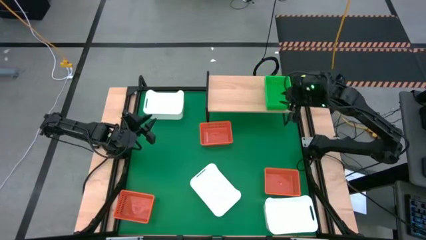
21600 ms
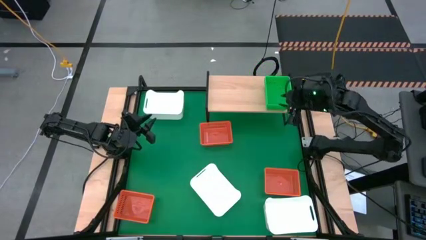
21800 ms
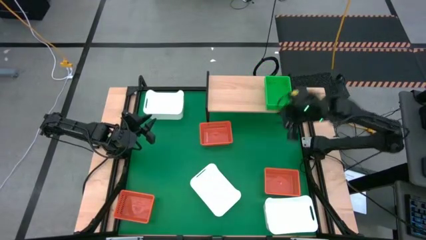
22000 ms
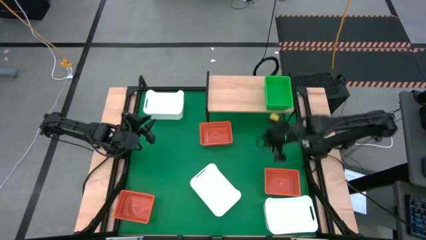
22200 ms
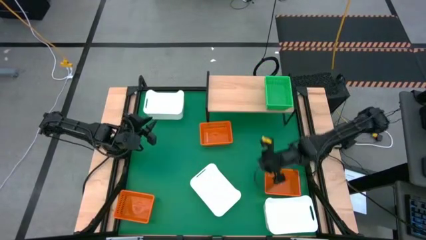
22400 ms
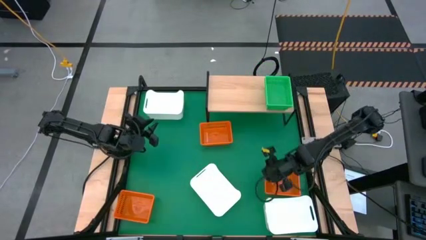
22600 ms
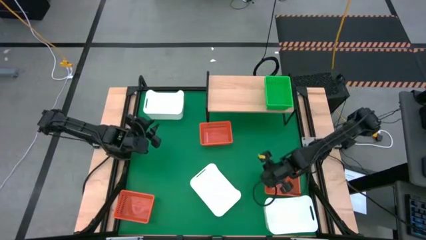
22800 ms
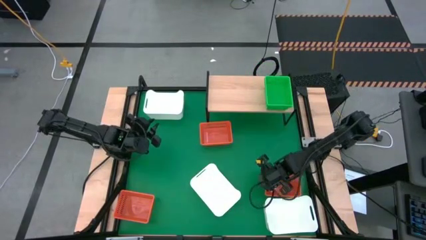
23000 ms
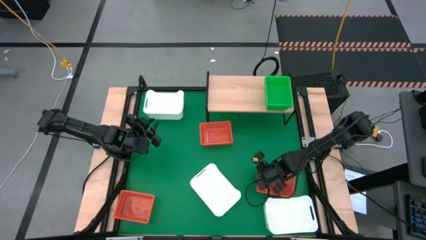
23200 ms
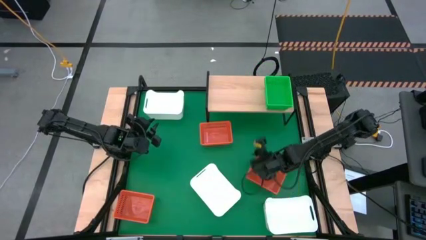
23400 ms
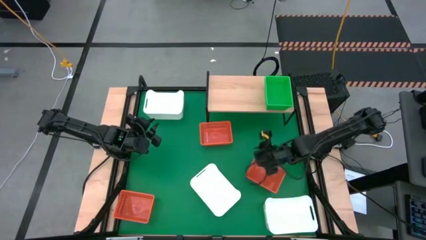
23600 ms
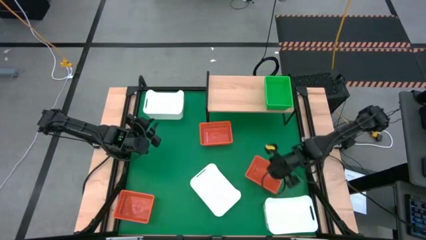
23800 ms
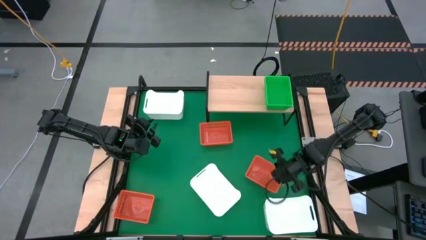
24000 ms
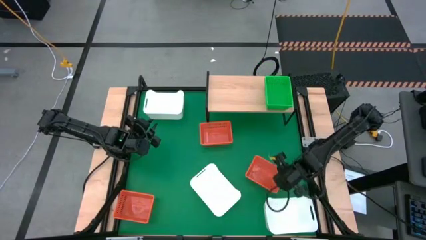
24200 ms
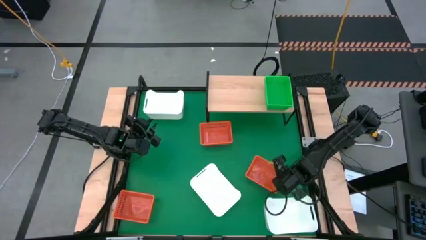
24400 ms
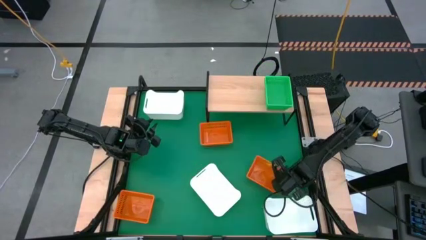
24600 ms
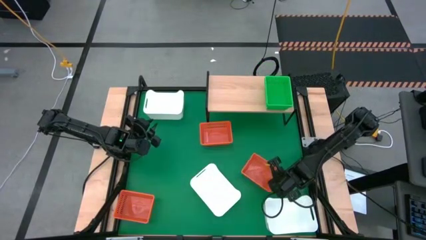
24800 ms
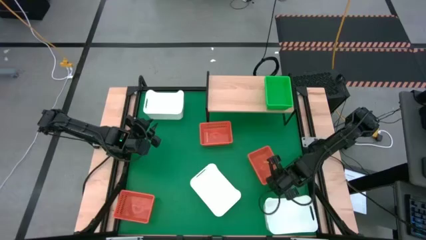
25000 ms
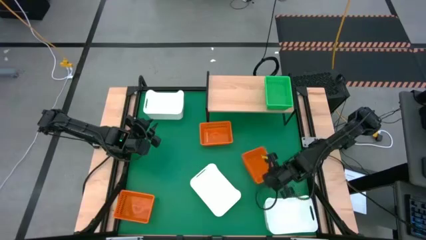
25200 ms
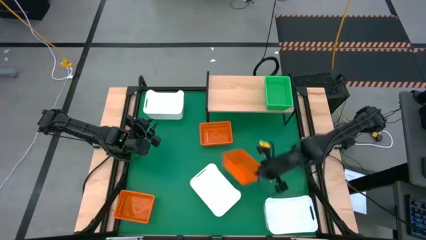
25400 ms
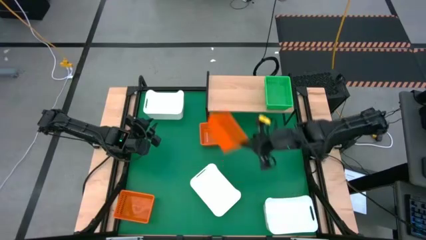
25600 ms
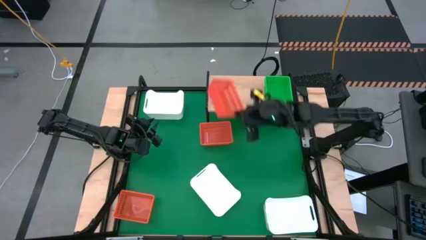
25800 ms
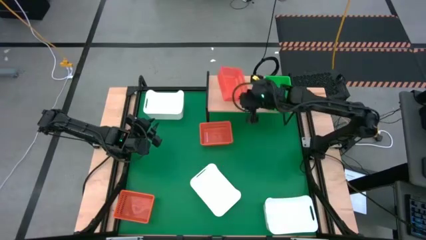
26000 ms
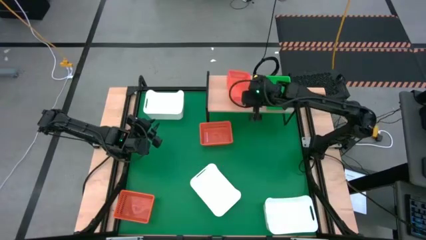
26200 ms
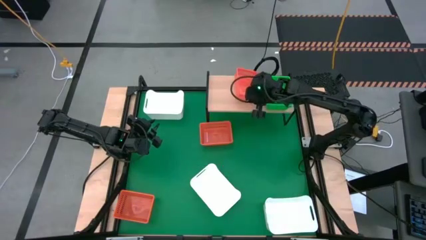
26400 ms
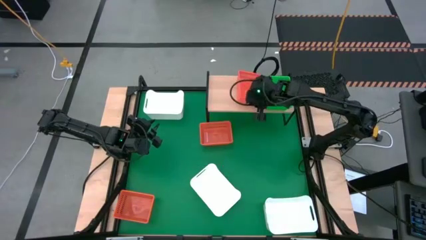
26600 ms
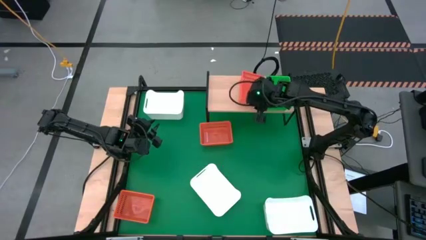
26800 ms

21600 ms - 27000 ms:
Task: Stack baskets on shelf by color
Put the bottom right orange bin on the shelf

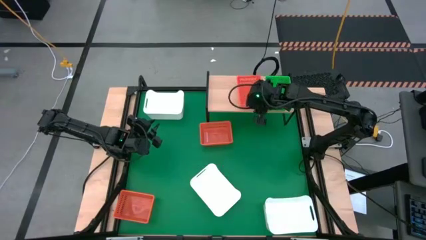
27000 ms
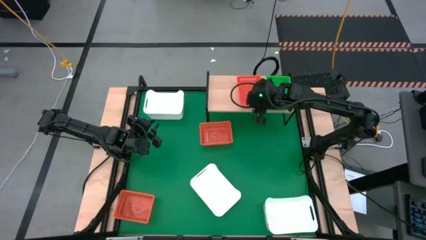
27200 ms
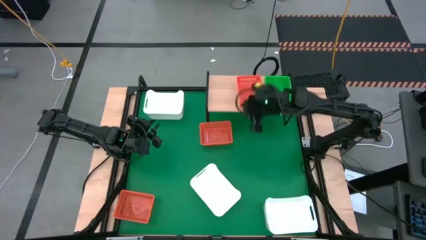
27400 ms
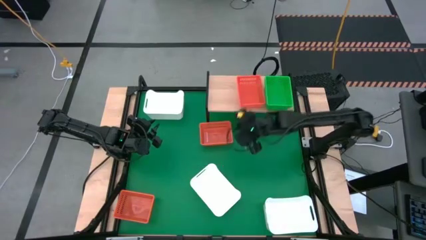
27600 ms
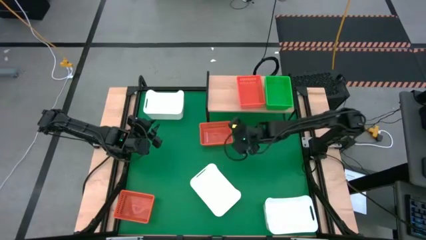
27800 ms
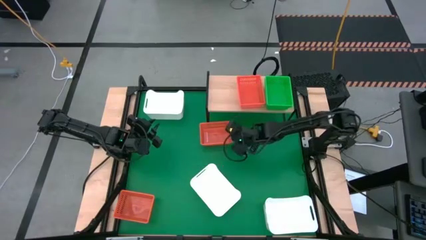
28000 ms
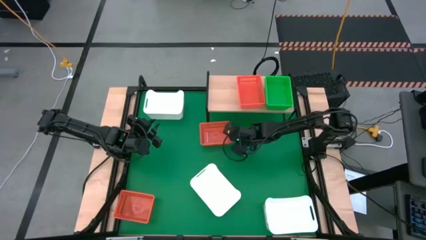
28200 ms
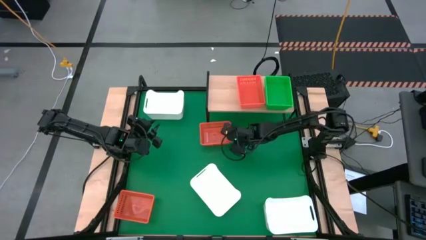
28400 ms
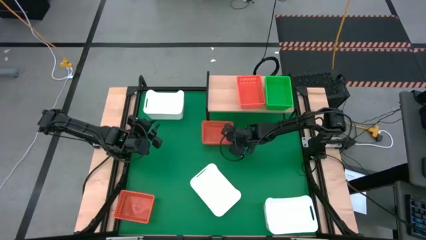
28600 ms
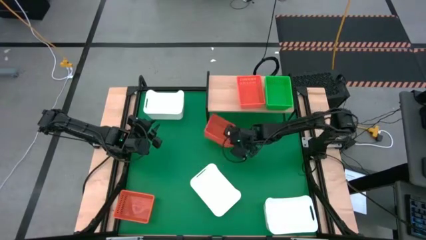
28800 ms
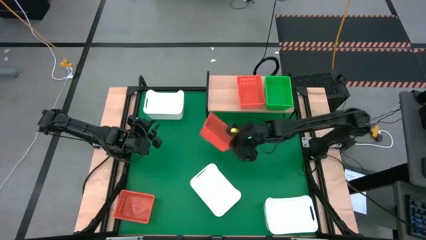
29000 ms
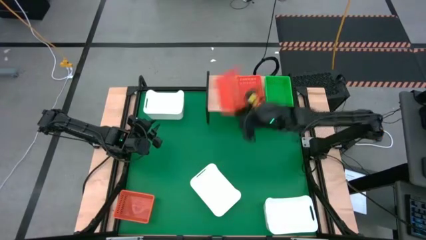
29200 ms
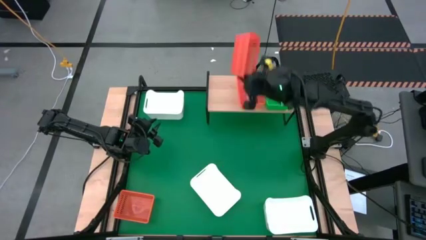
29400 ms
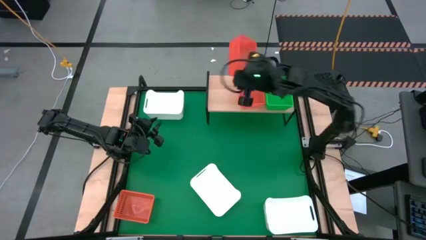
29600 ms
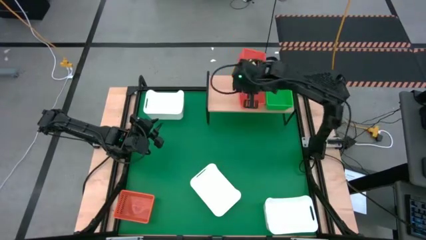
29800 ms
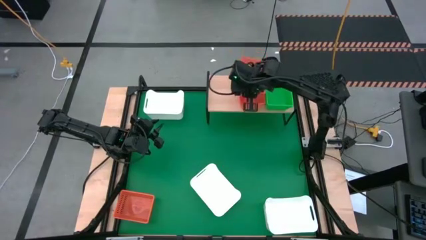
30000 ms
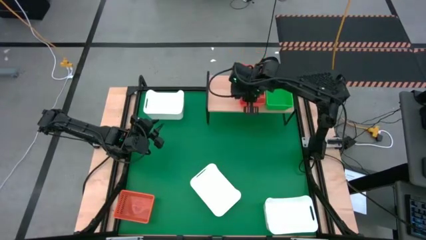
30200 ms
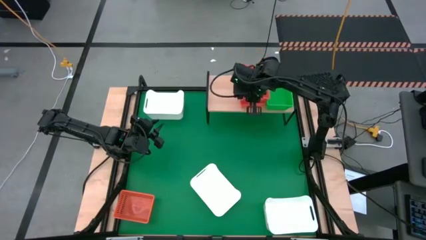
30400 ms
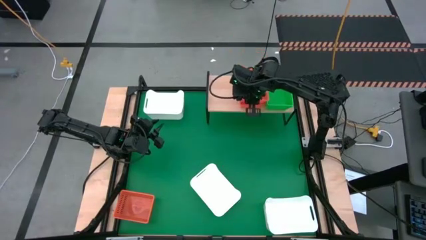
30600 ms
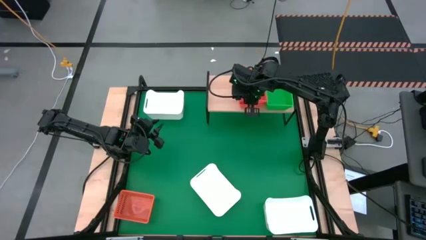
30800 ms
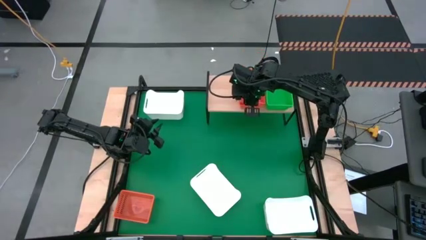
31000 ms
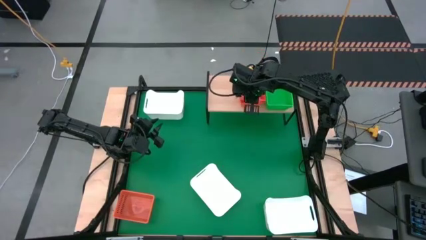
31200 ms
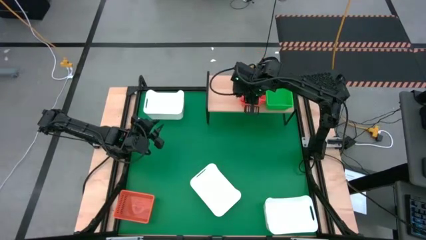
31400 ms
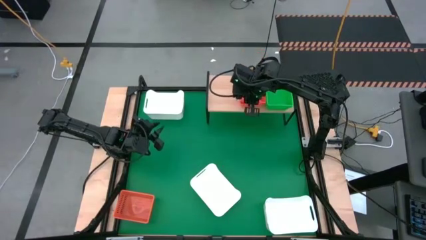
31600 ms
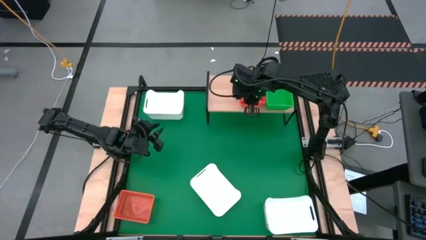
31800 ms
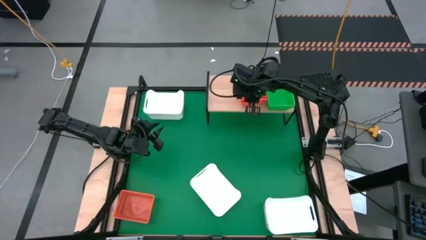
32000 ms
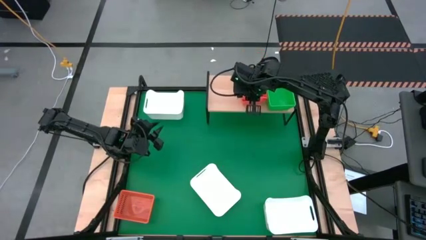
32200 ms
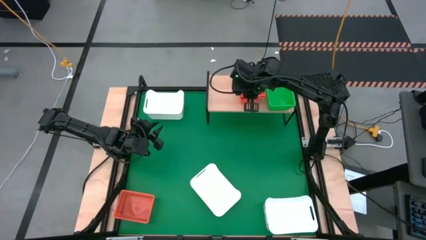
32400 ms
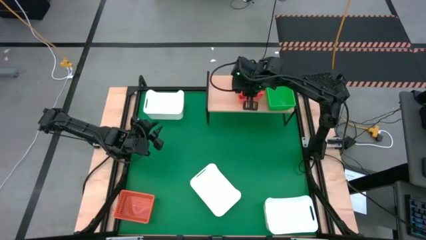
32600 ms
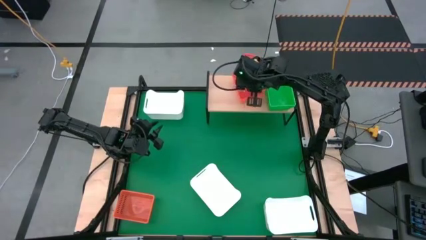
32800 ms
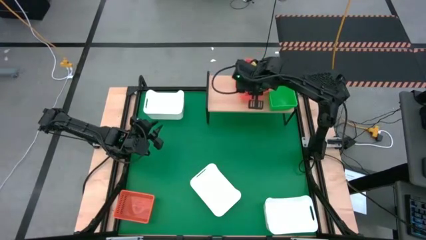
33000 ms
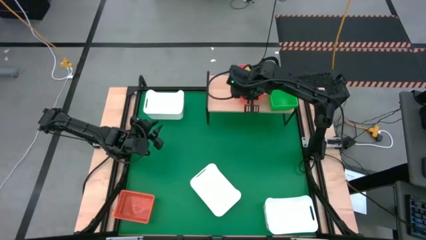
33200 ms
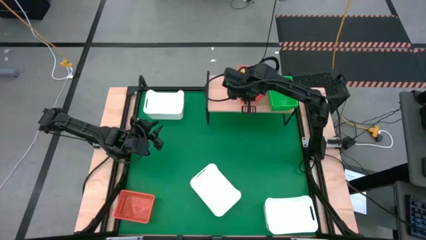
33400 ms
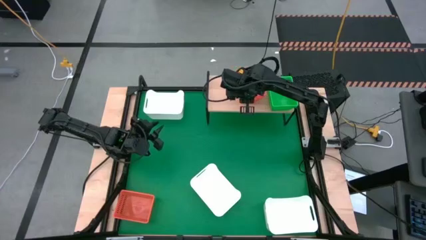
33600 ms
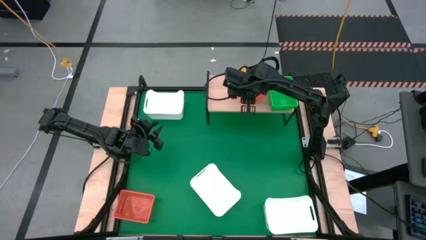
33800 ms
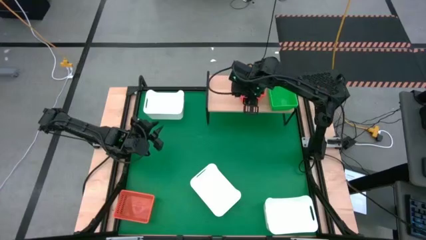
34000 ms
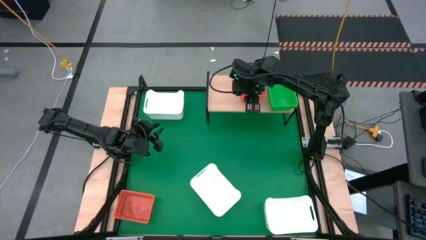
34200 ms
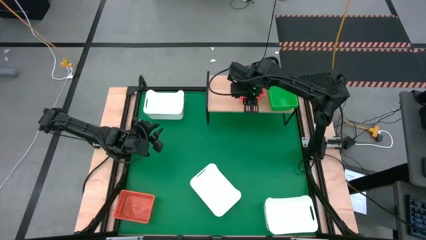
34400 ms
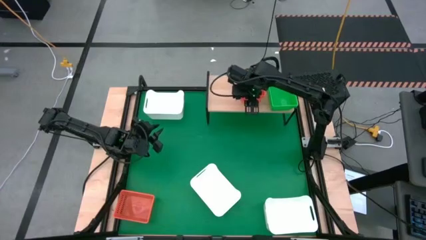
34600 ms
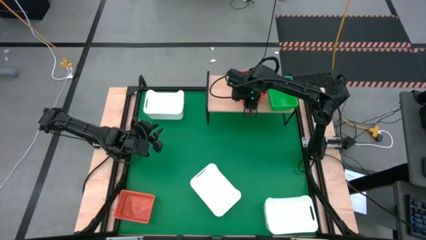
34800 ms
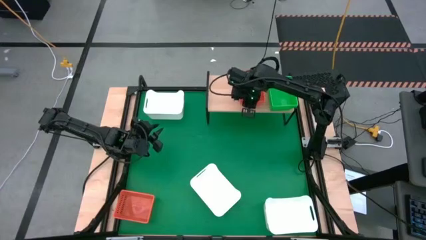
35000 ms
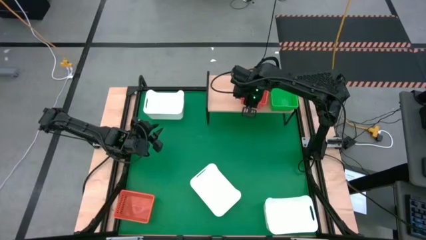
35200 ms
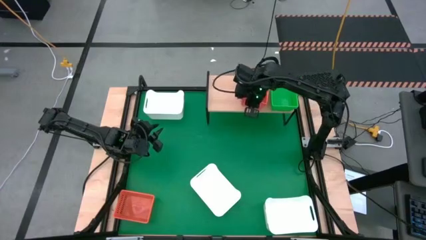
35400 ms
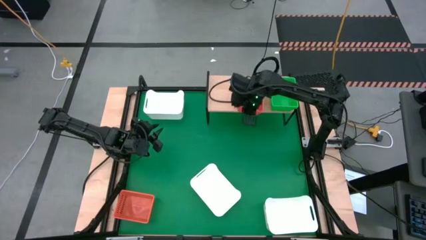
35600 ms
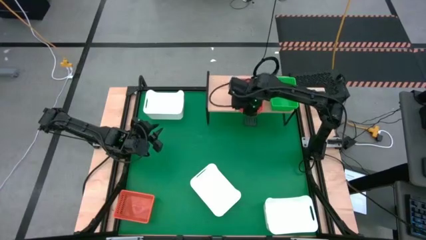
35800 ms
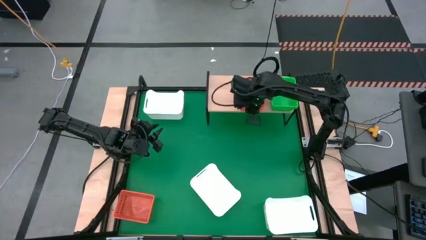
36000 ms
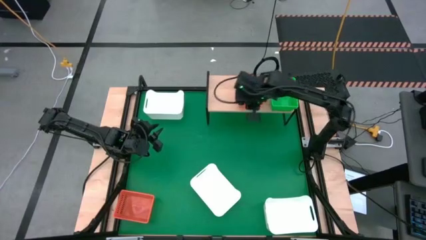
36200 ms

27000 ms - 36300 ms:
Stack the top orange bin on top of the orange bin on the shelf
